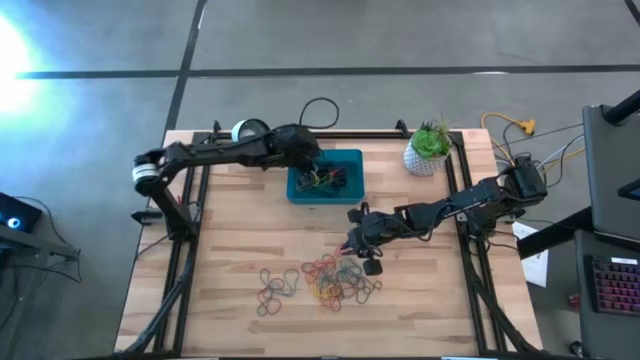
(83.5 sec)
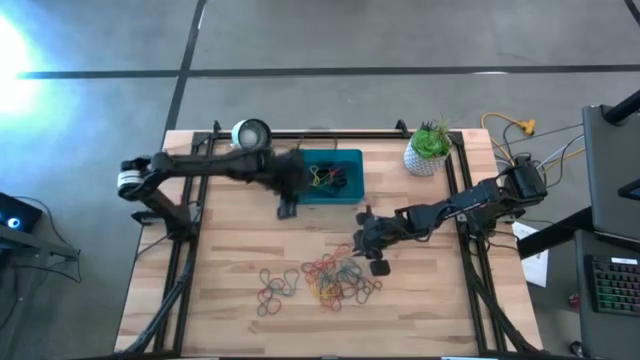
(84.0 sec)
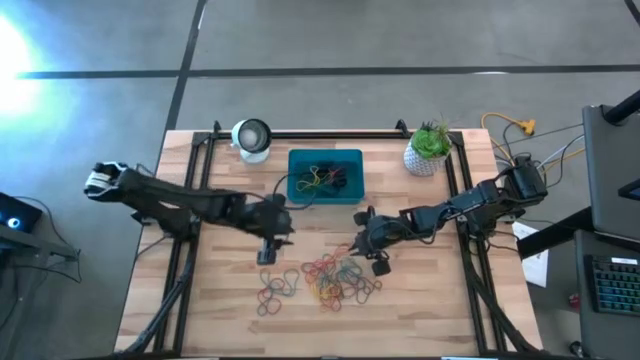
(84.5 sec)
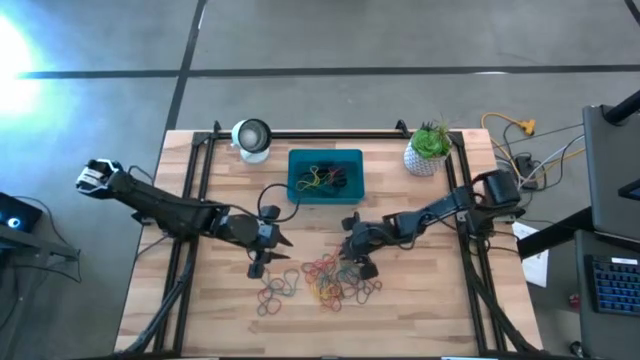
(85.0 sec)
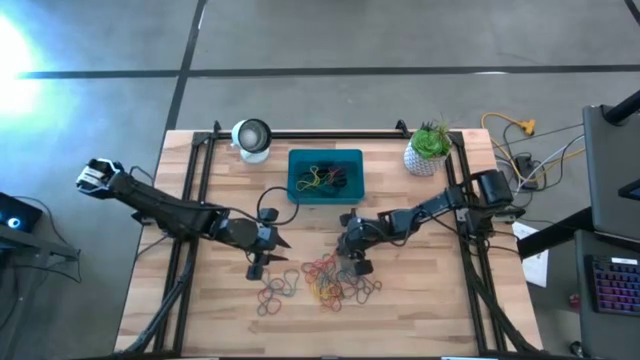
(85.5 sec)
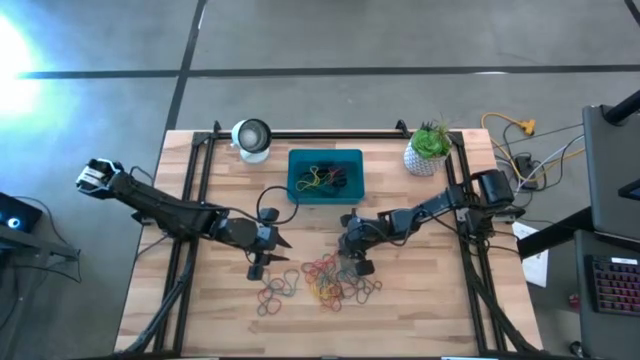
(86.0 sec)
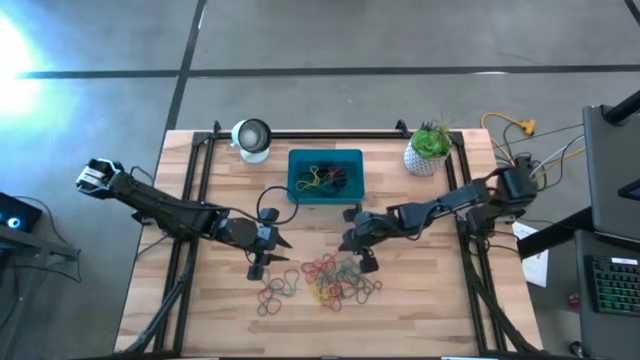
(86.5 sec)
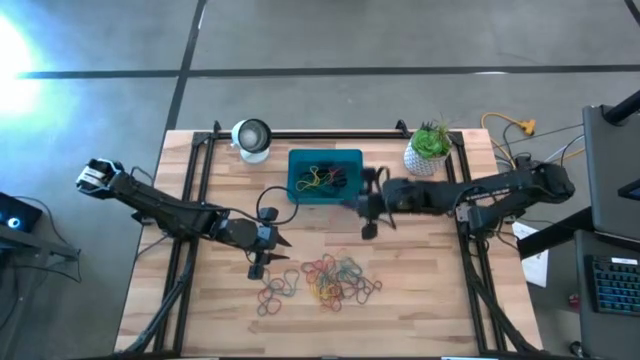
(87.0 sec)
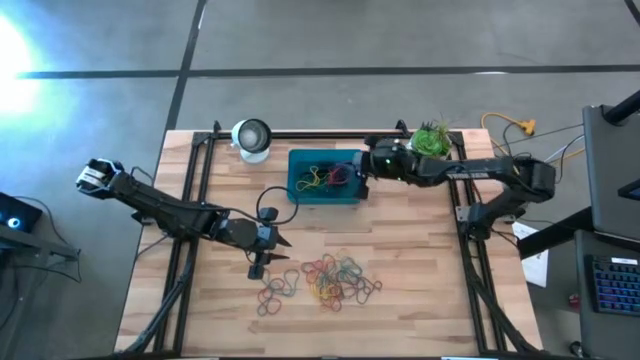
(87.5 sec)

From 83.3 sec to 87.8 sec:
Task: Pick and place rubber bands into bin
Put the red rubber band into the bin

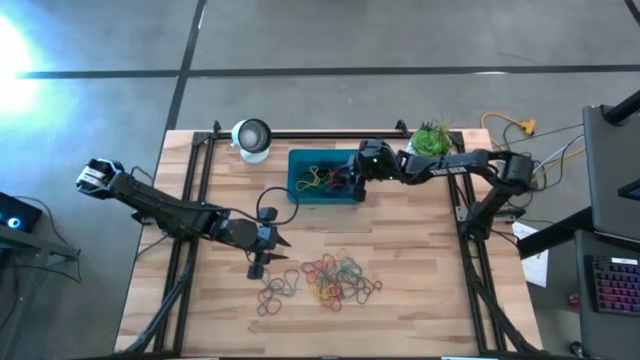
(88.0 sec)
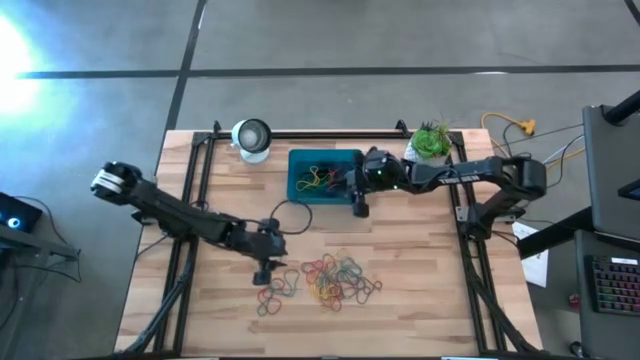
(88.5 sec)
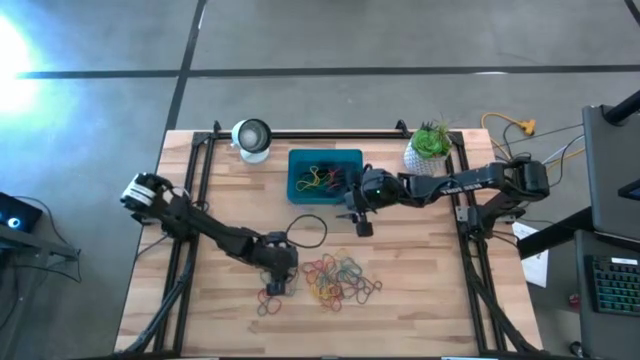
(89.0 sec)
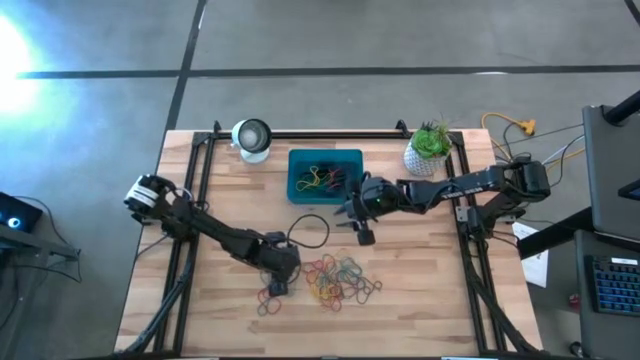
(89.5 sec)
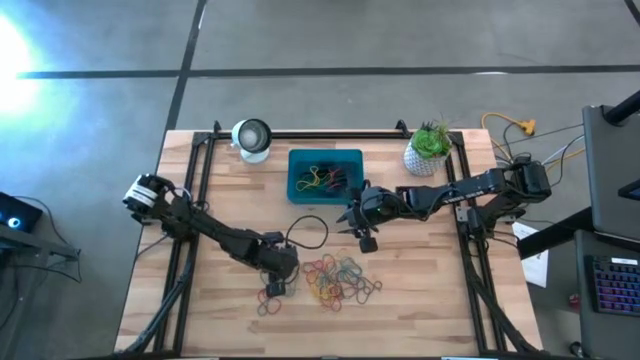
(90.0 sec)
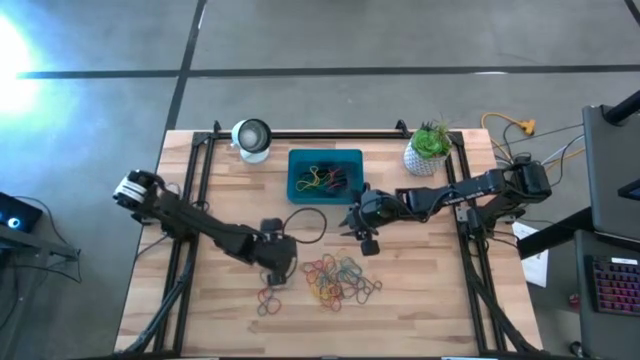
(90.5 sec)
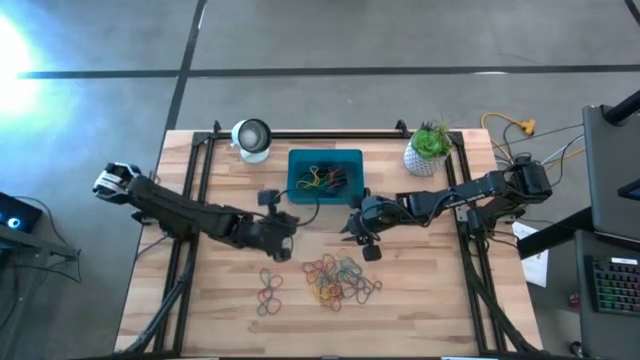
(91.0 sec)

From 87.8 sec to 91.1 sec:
Put the blue rubber band into the bin

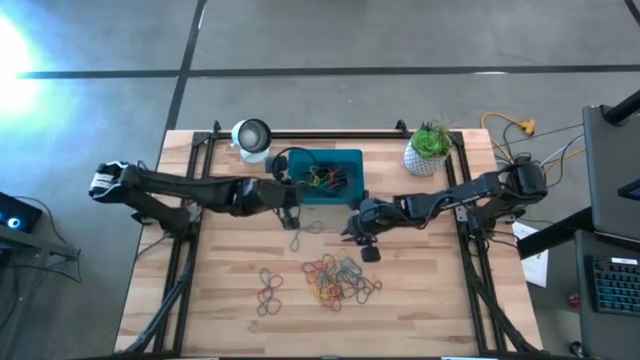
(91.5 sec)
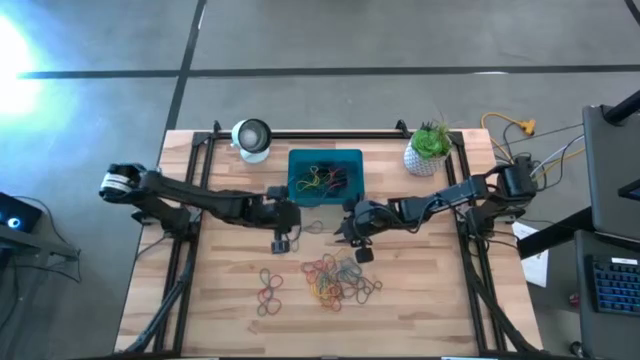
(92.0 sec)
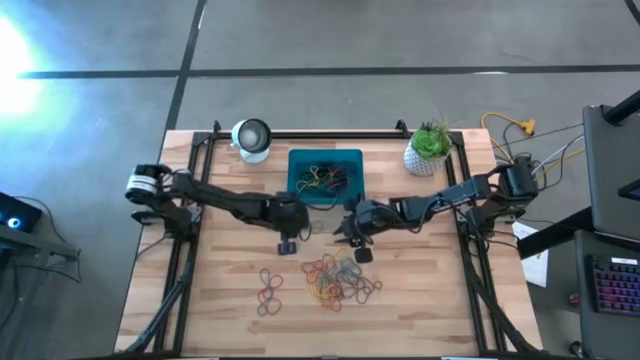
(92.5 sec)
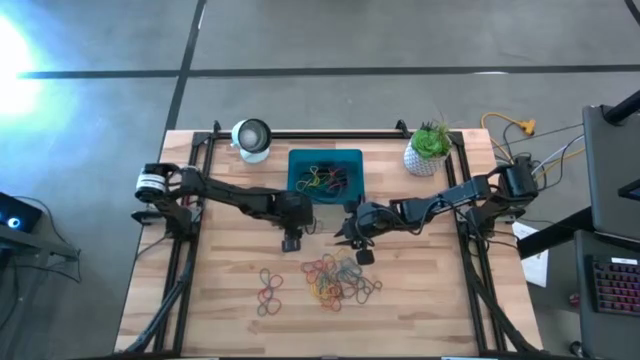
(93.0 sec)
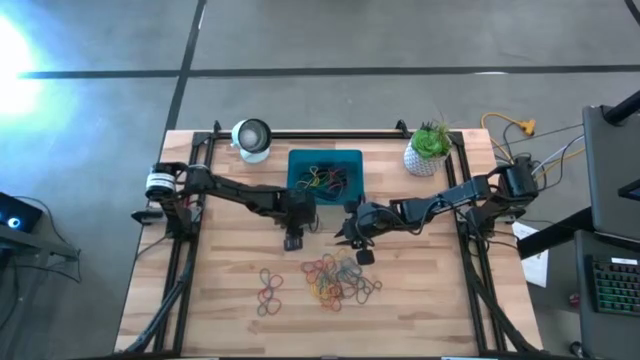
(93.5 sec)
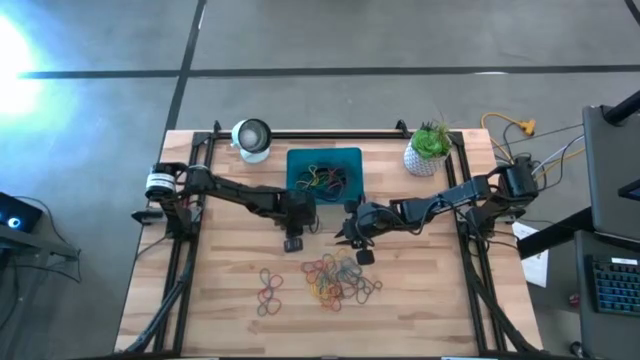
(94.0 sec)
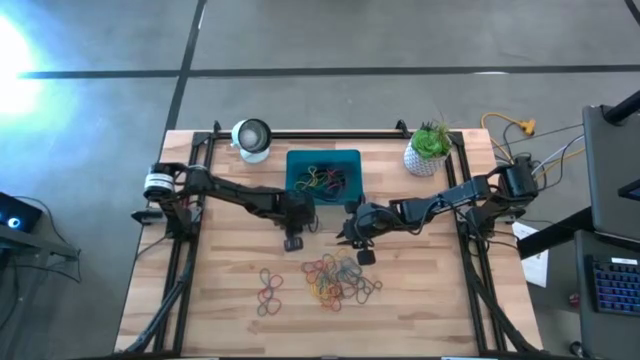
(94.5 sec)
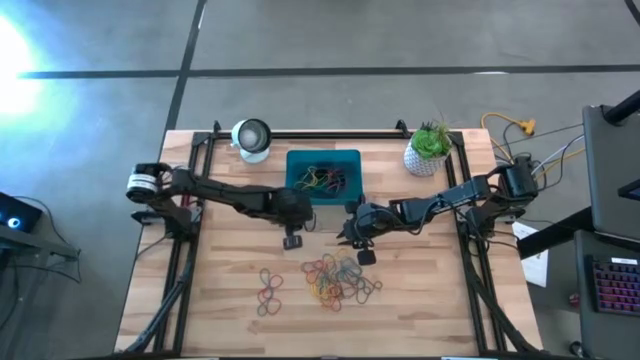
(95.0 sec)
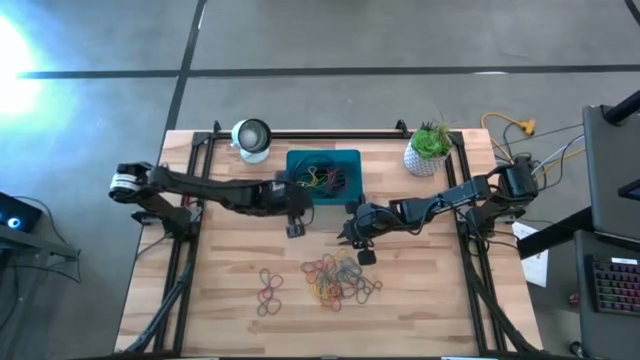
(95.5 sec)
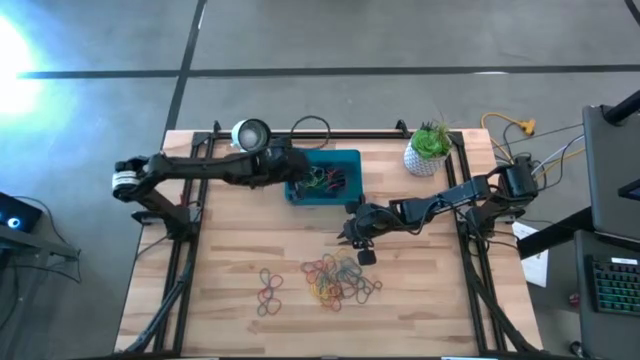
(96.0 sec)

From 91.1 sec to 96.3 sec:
Put the blue rubber band into the bin

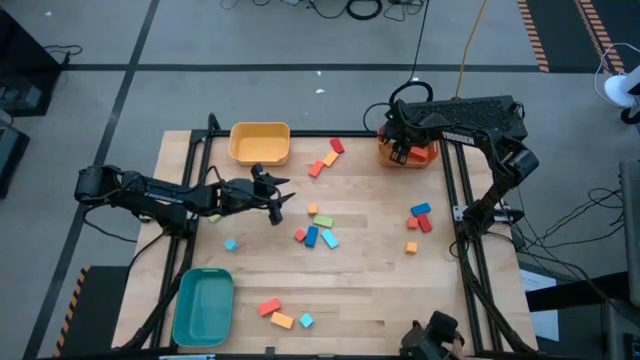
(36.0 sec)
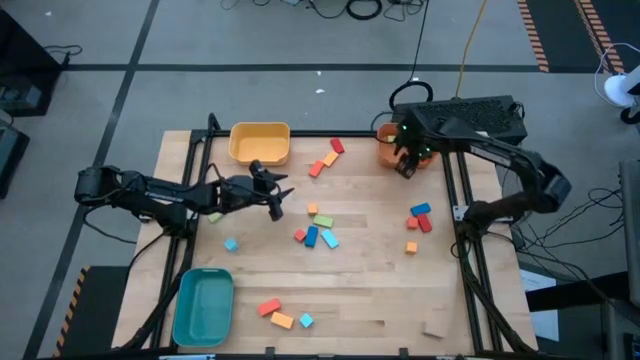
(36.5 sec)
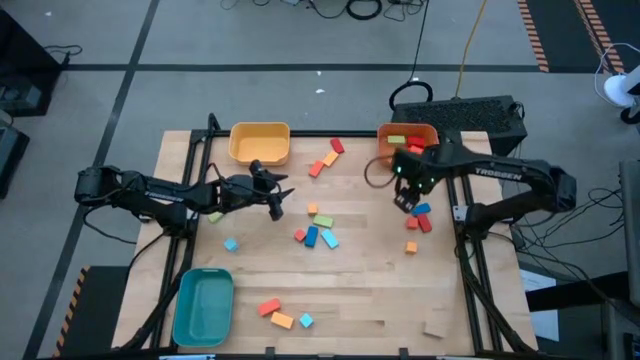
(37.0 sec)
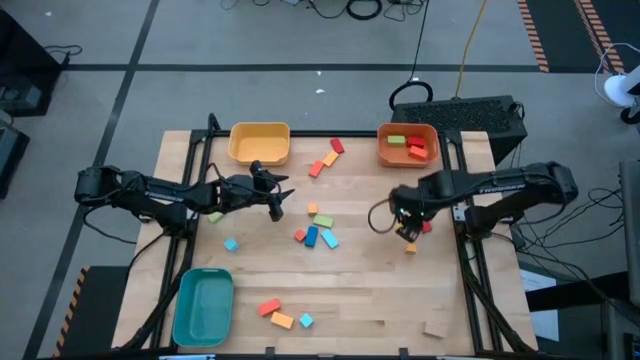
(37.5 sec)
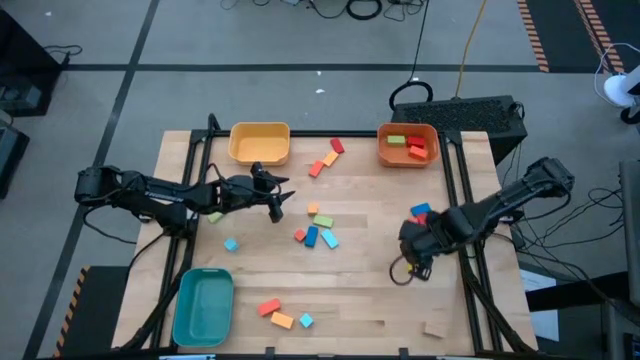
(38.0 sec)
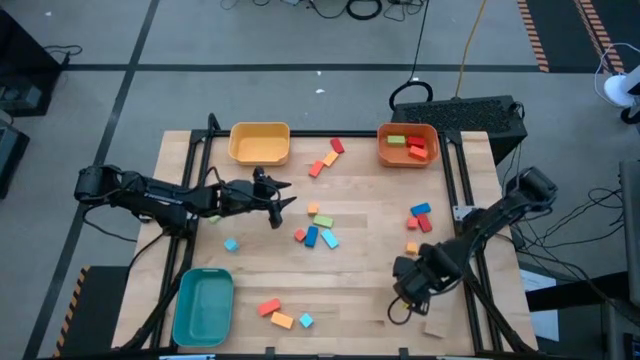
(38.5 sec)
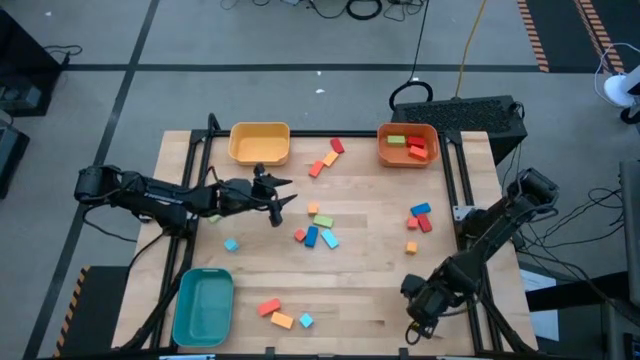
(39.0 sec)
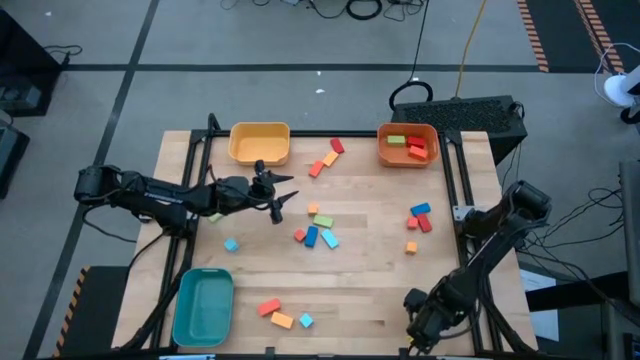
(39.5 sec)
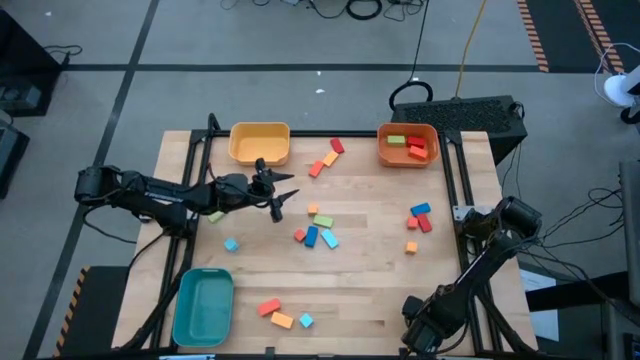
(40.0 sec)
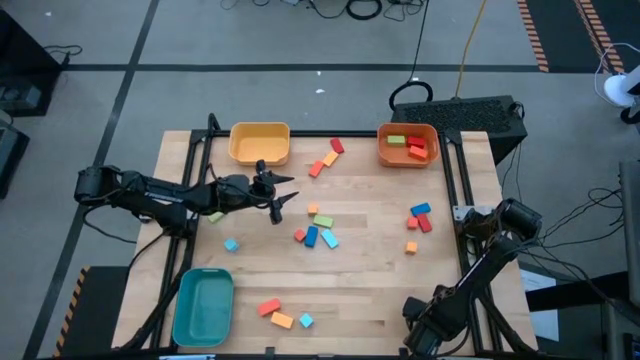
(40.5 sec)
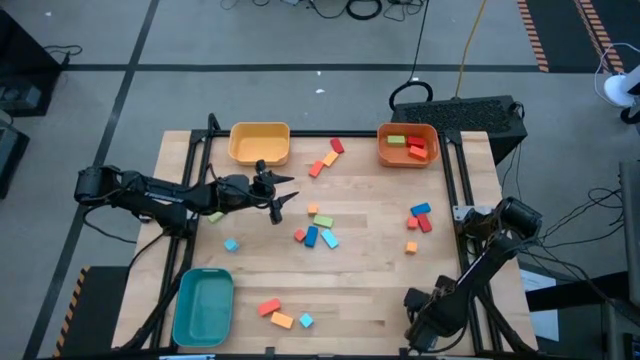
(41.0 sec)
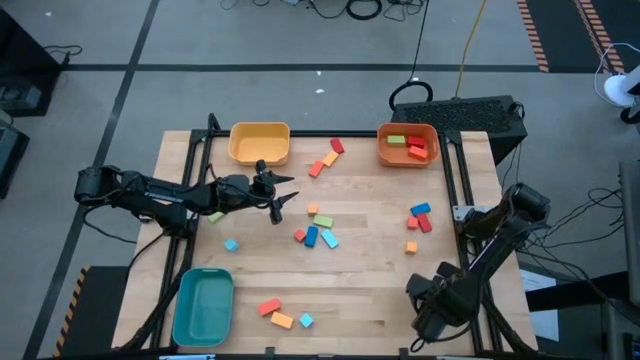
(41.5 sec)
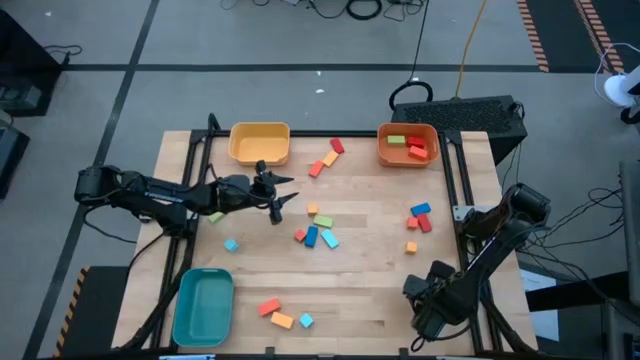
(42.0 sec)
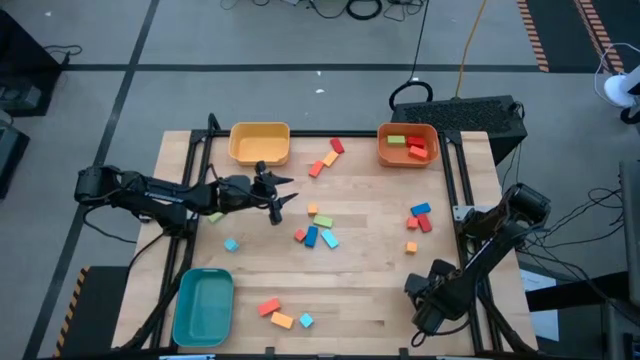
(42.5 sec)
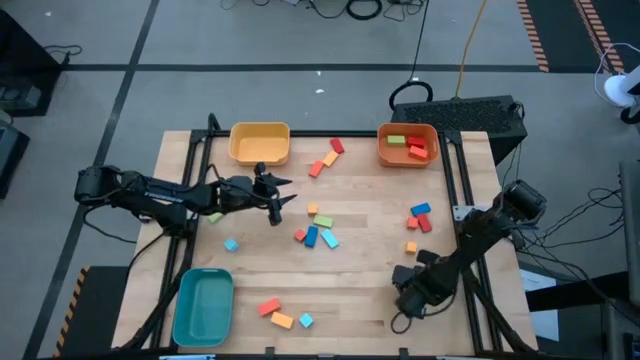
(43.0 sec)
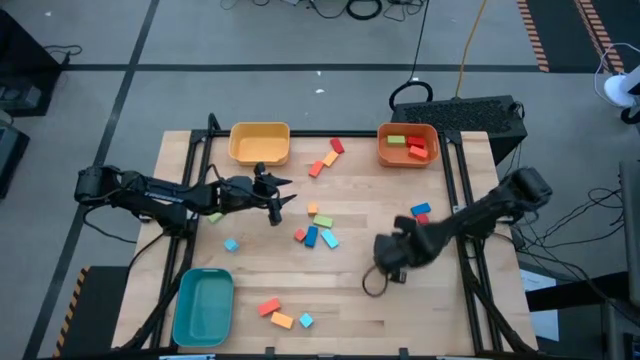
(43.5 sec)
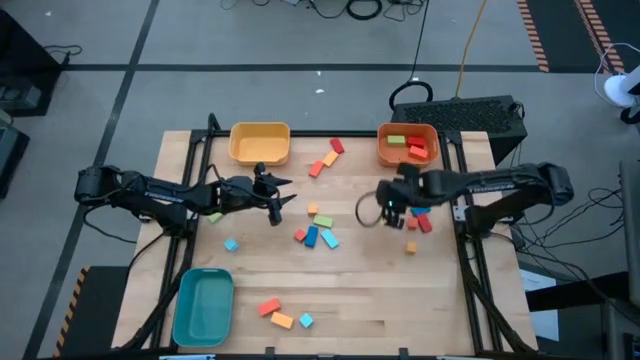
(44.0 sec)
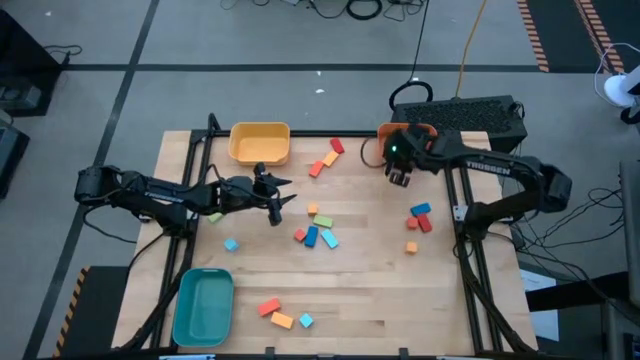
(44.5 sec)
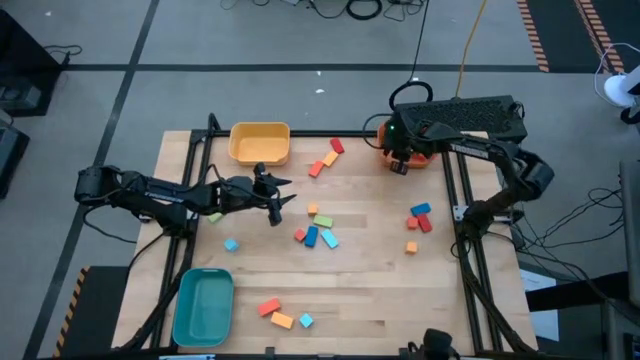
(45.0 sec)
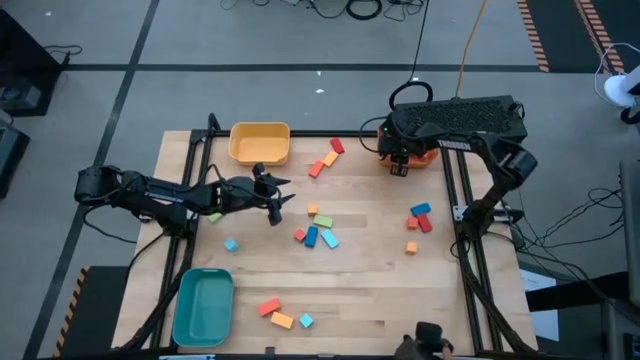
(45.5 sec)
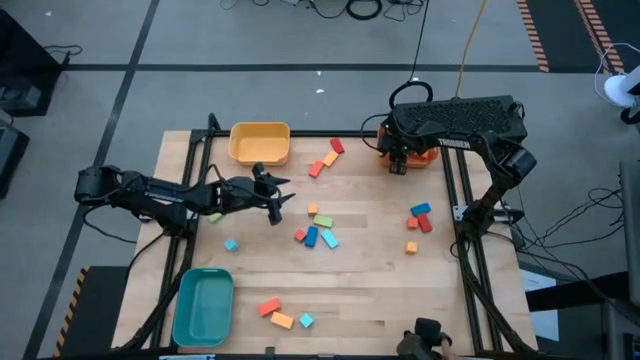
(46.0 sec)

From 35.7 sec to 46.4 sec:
Task: Sort blocks by size
Put the large white block into the orange bin
